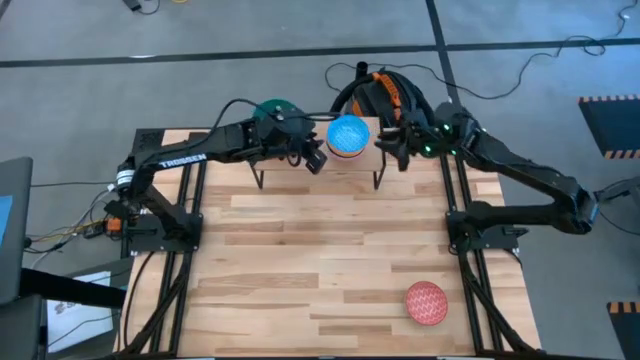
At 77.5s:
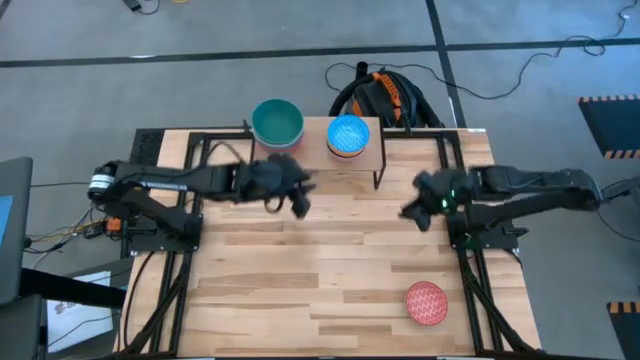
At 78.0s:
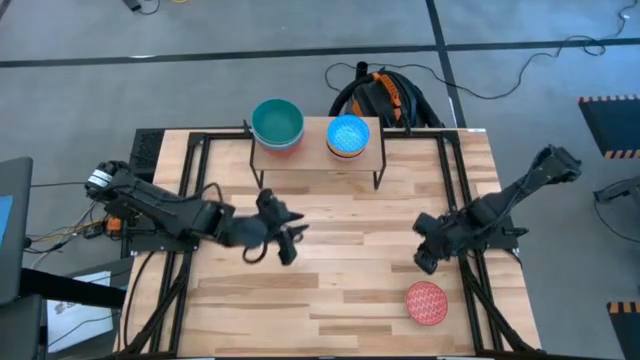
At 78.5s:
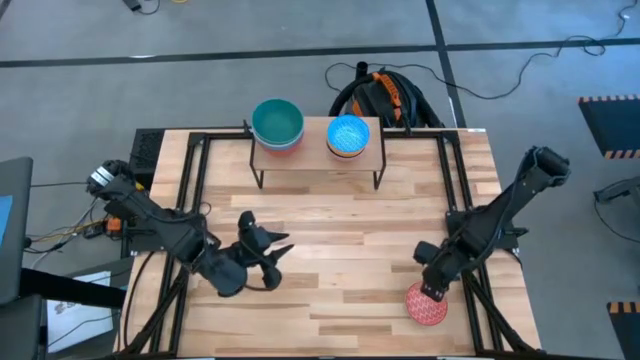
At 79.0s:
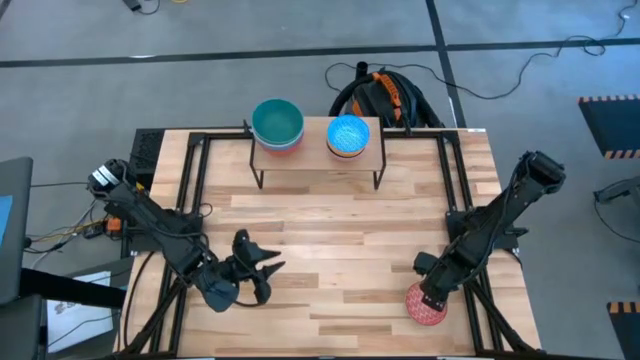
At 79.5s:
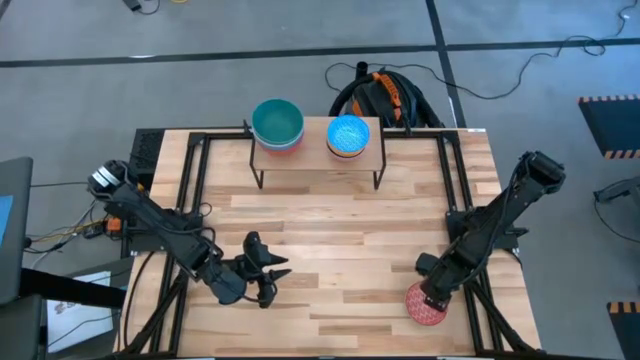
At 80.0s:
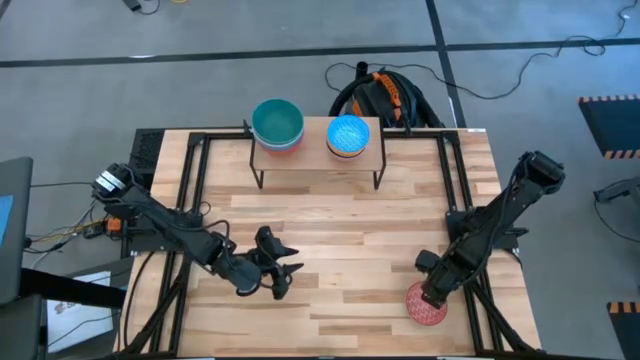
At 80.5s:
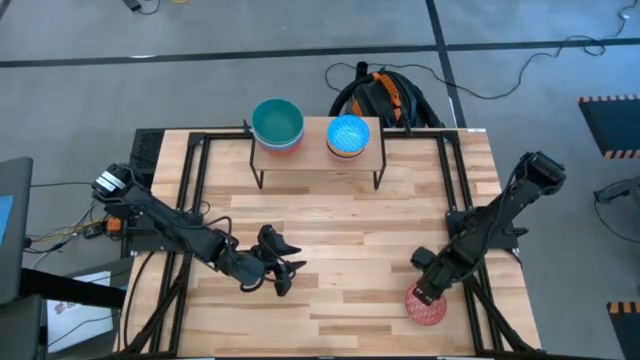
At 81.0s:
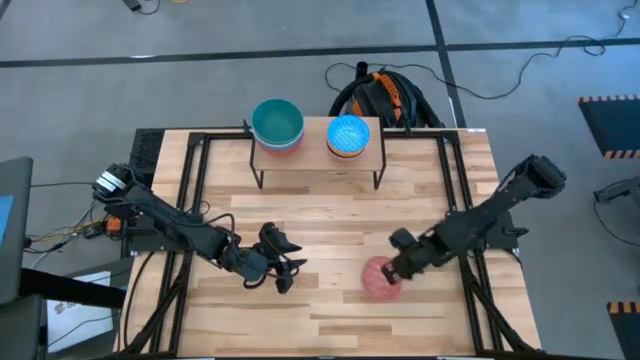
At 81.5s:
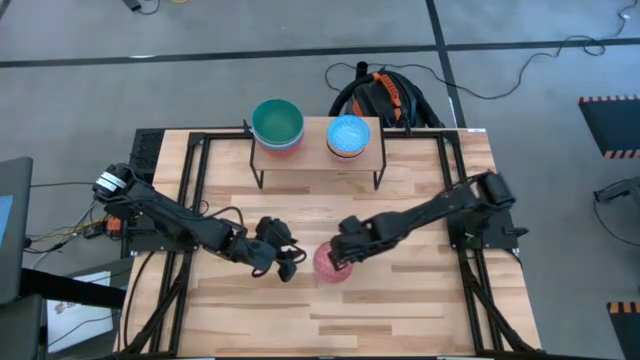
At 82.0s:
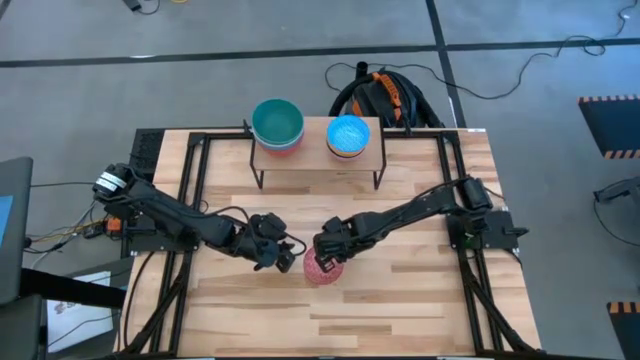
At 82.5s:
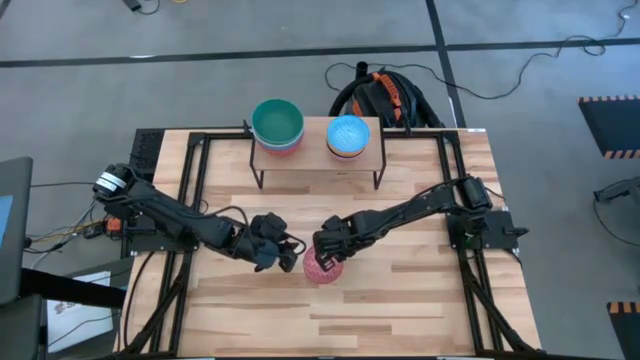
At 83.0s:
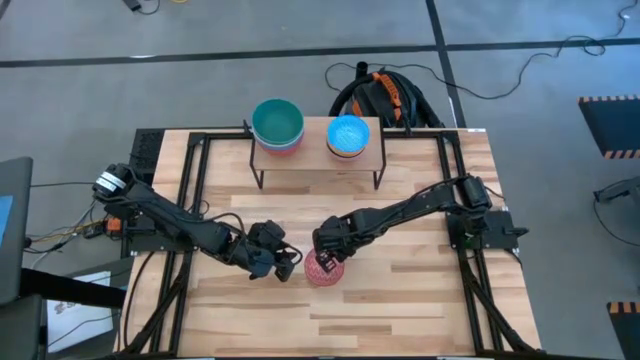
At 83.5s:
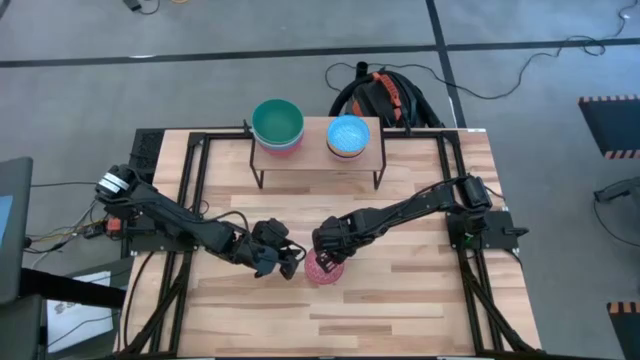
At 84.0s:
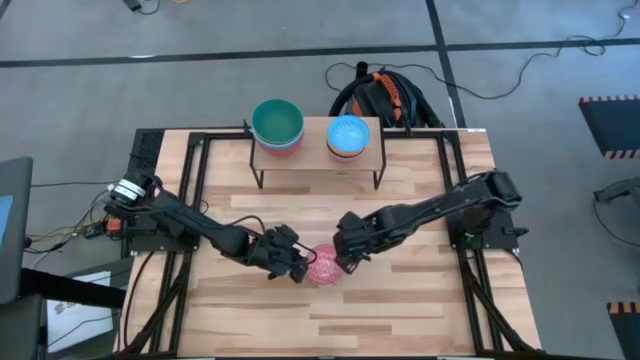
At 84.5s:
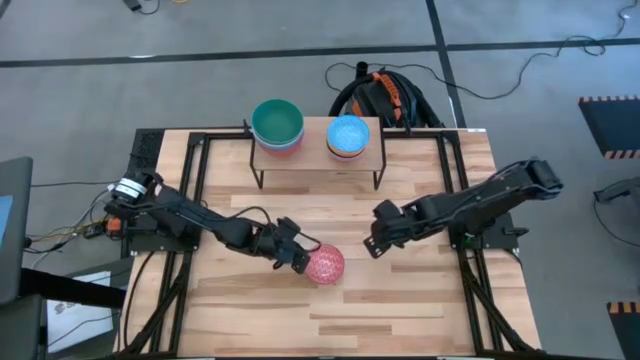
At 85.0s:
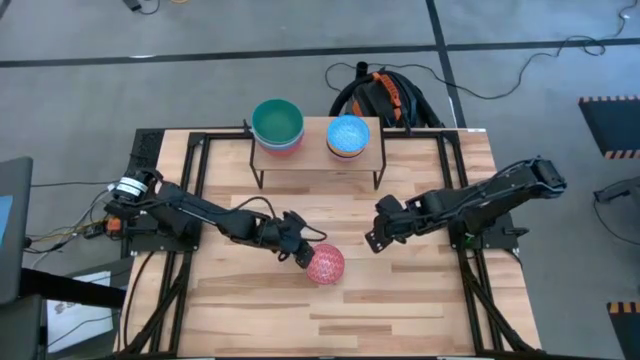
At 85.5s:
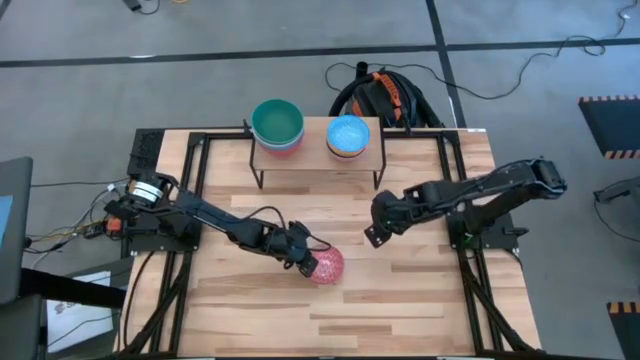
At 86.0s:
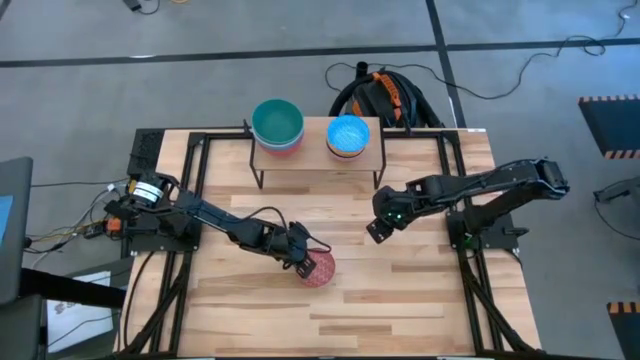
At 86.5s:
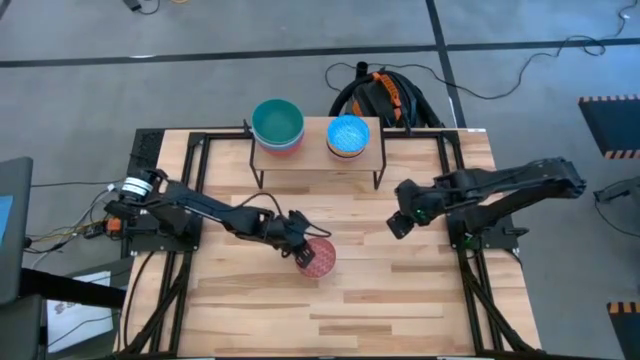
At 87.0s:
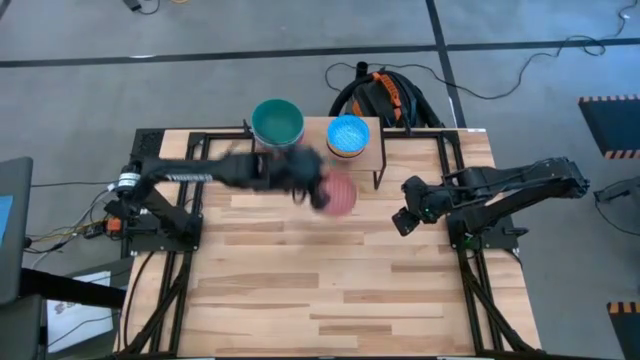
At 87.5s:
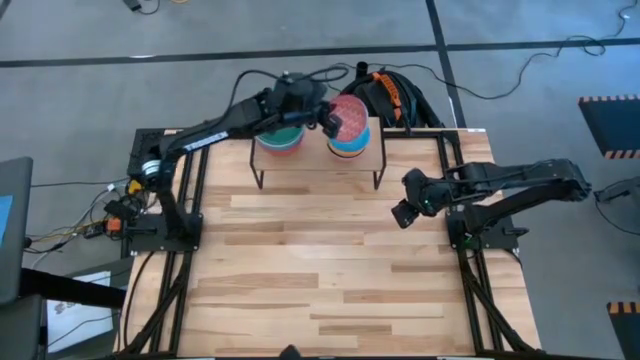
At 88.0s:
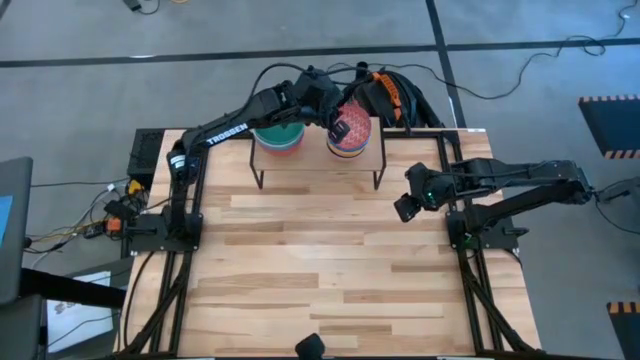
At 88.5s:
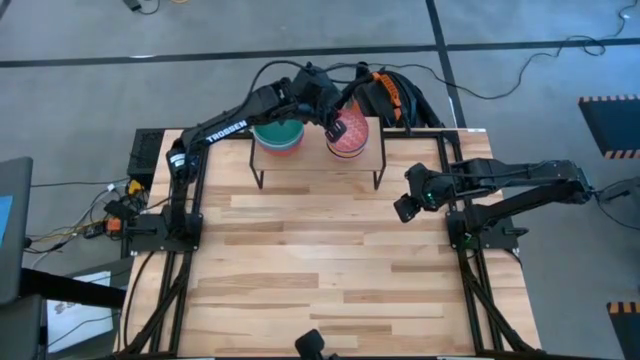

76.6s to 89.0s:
Task: Place and stack bowls onto a shelf
Stack the red patterned bowl on top of the light blue patterned bowl on the shelf

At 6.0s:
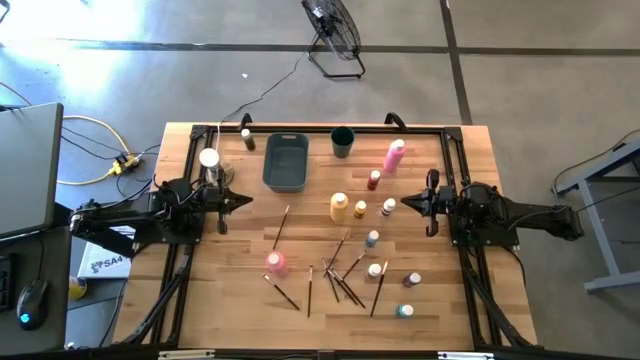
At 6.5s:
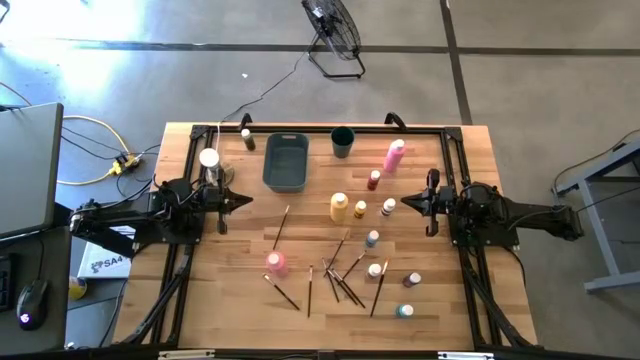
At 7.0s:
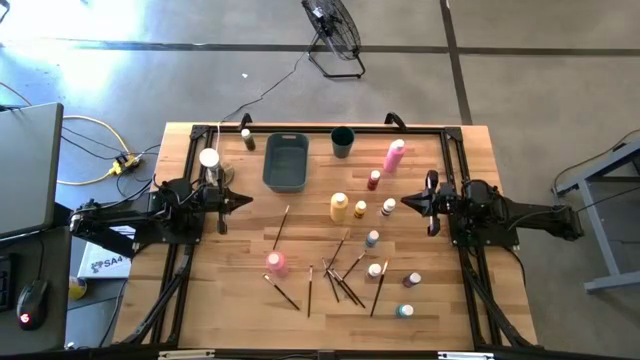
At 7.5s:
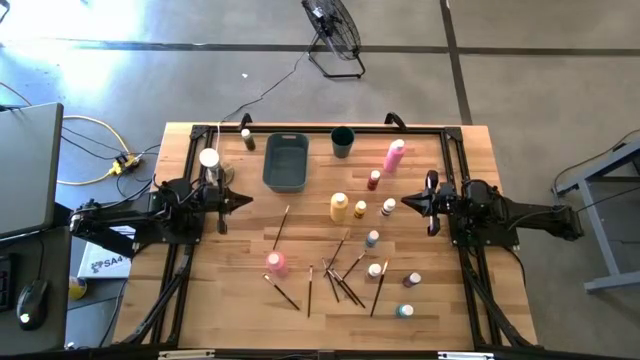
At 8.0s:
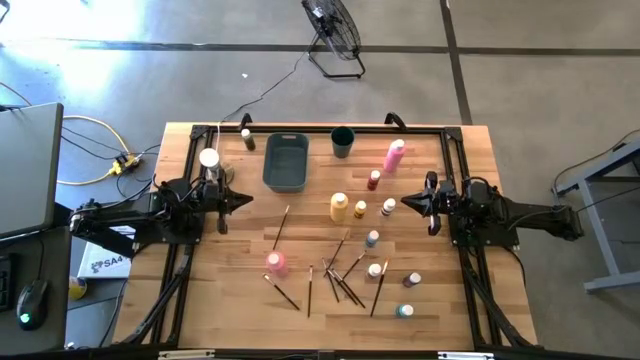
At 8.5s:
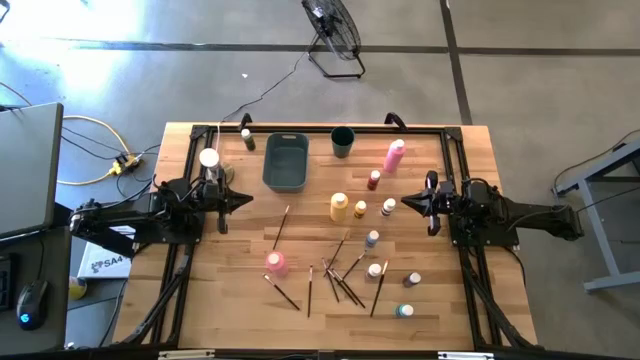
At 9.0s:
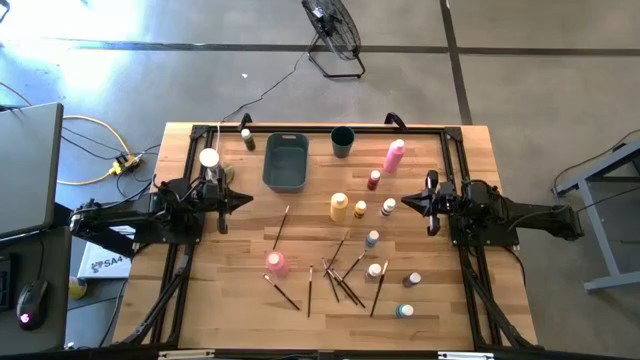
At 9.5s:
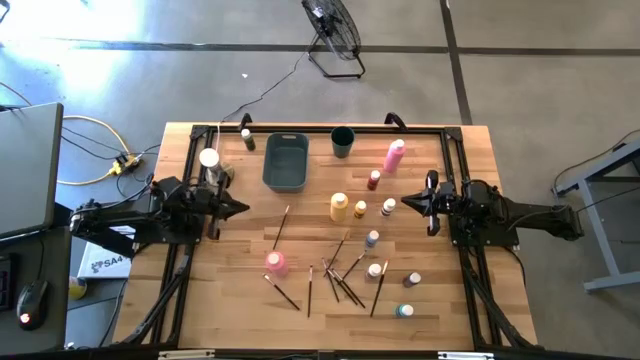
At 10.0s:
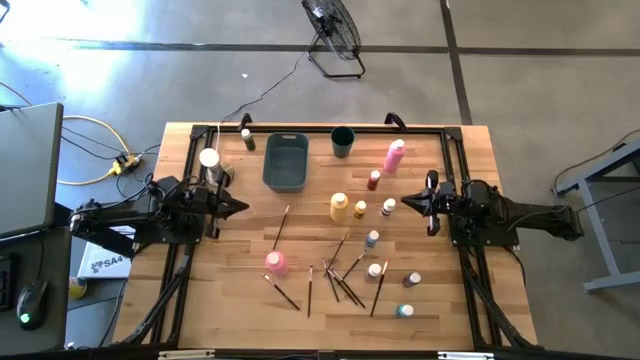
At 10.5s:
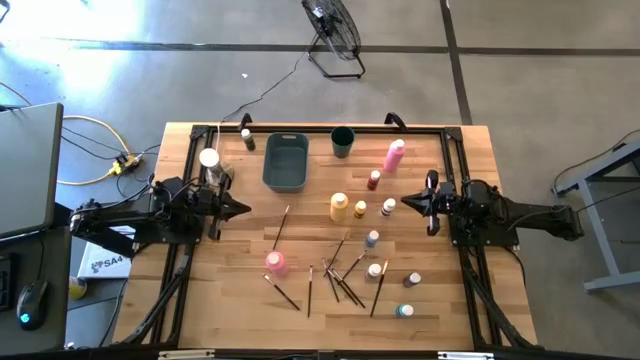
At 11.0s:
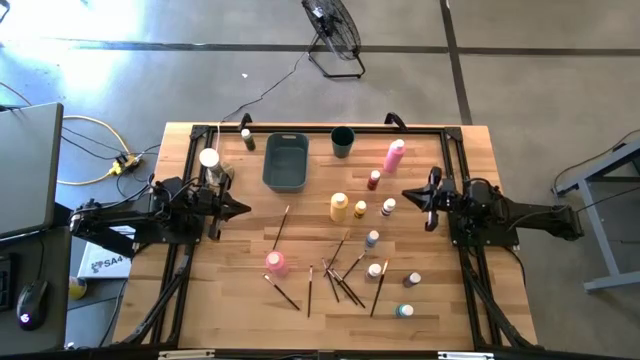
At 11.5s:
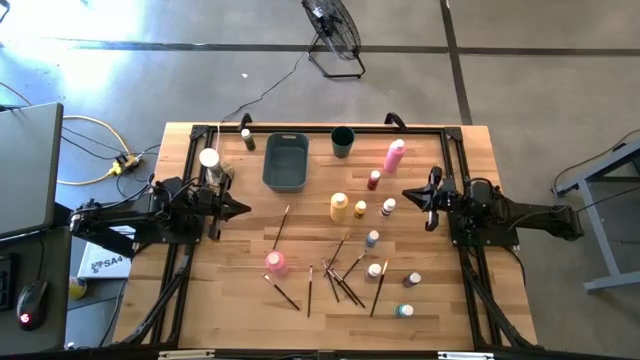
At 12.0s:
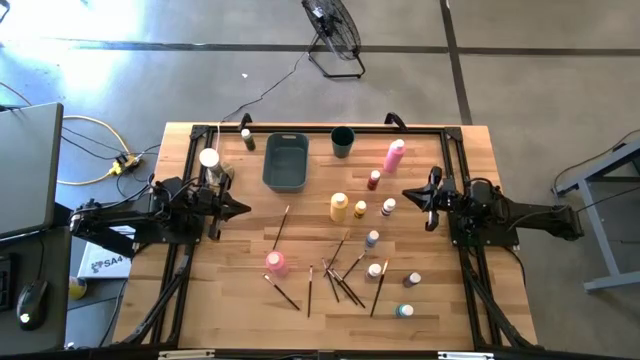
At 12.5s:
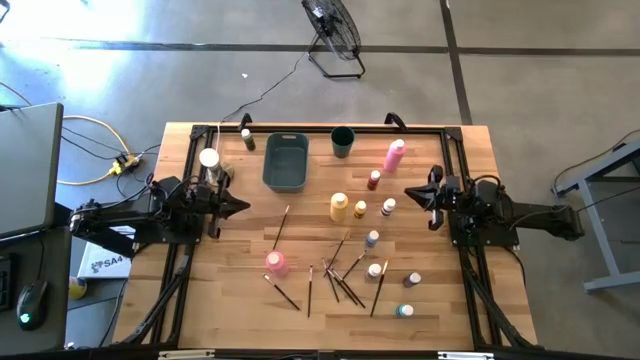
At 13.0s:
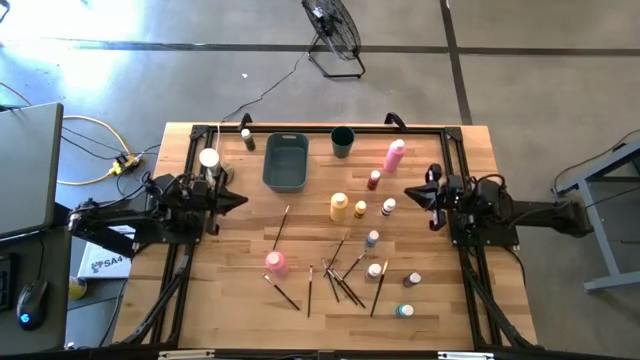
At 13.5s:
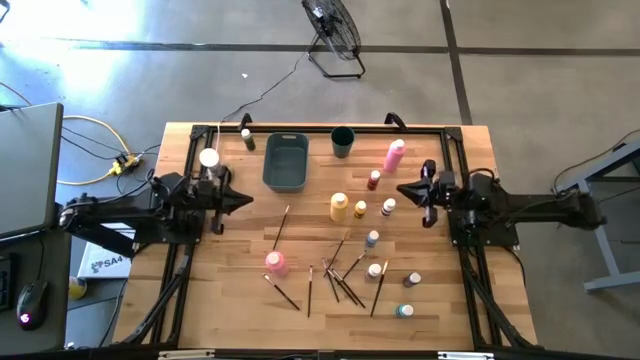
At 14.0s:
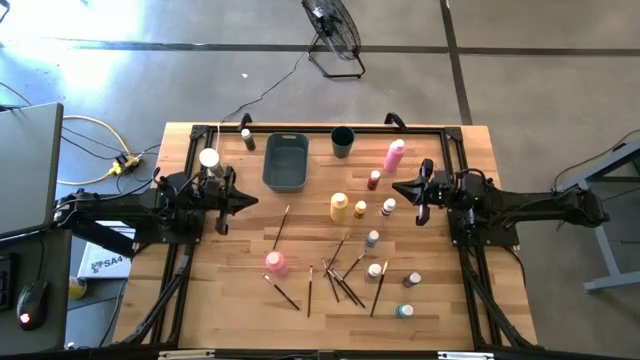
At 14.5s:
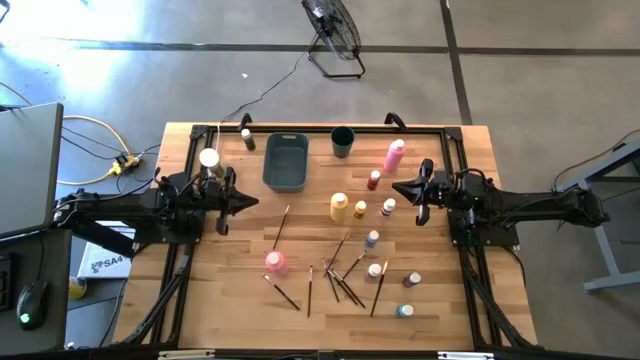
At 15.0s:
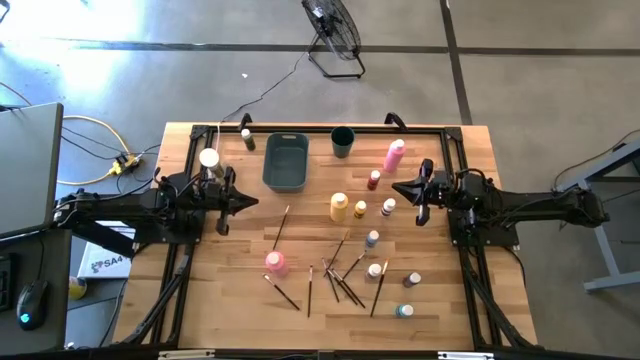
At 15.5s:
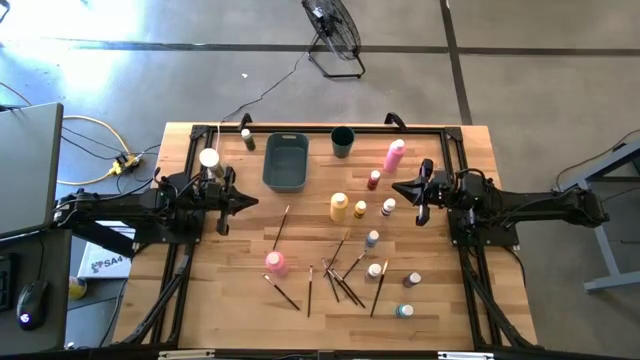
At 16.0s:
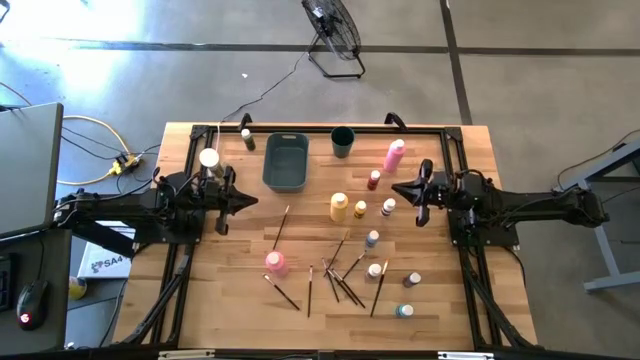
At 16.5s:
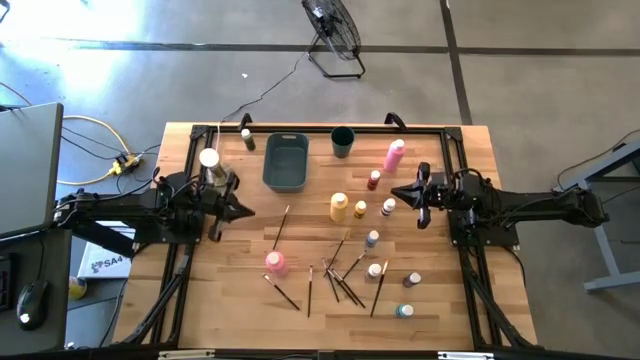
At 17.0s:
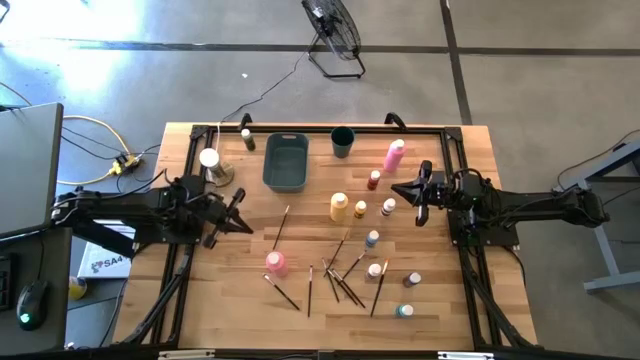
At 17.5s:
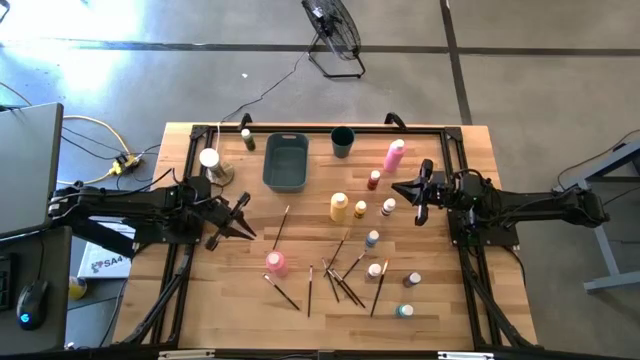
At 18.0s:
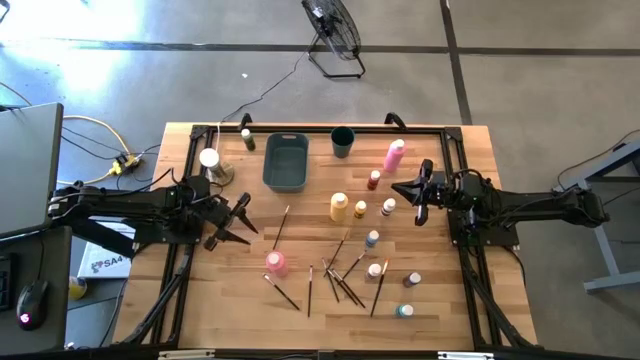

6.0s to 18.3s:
Task: Pick & Place Paint Supplies
Put the large pink paint bottle into the green bin
